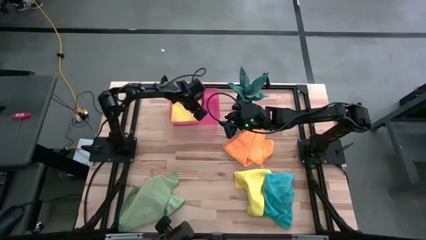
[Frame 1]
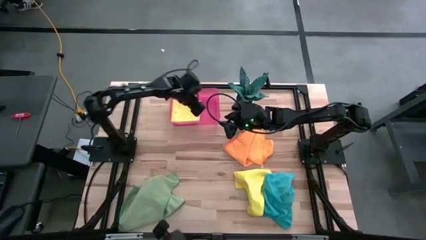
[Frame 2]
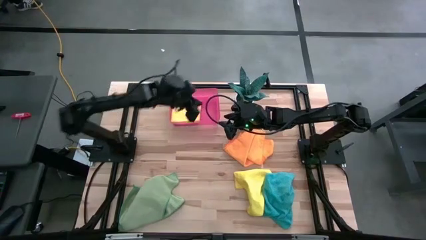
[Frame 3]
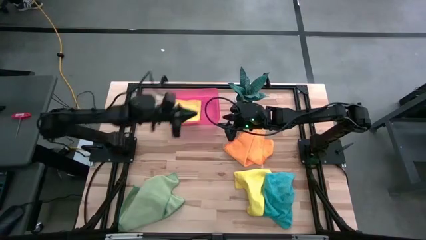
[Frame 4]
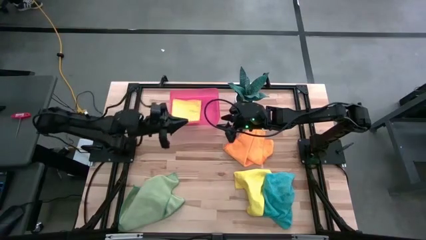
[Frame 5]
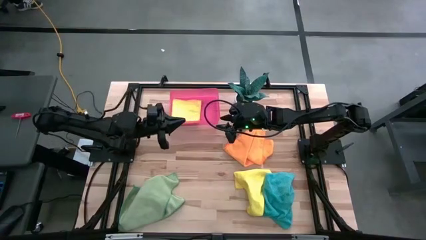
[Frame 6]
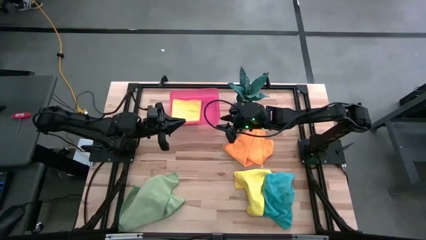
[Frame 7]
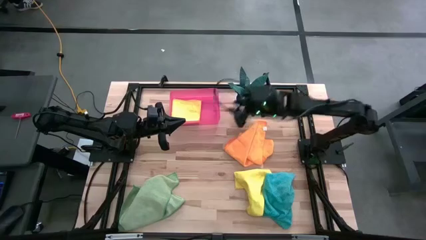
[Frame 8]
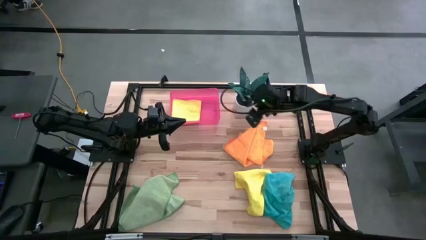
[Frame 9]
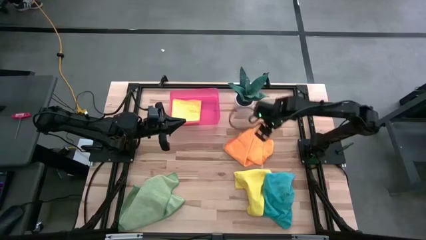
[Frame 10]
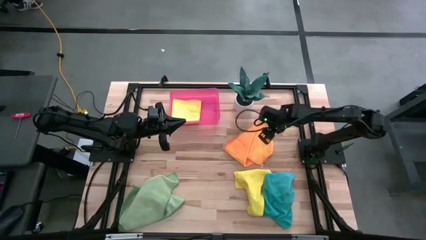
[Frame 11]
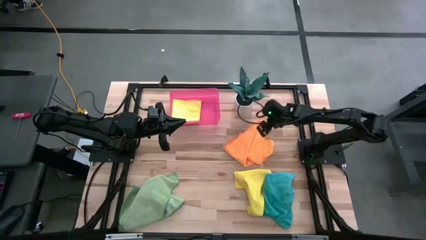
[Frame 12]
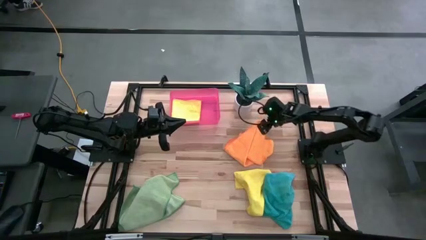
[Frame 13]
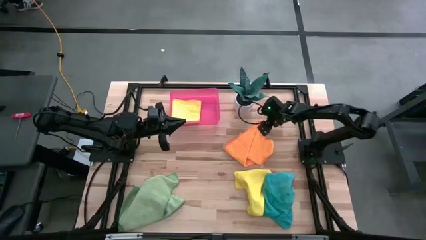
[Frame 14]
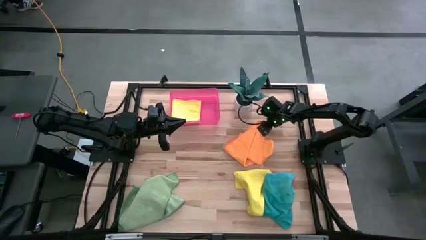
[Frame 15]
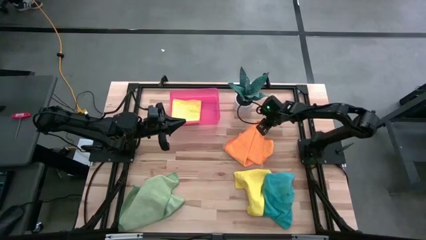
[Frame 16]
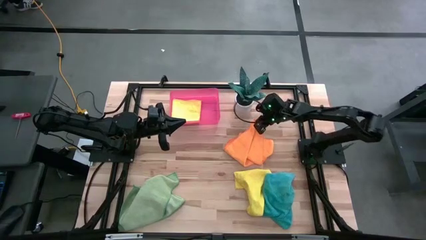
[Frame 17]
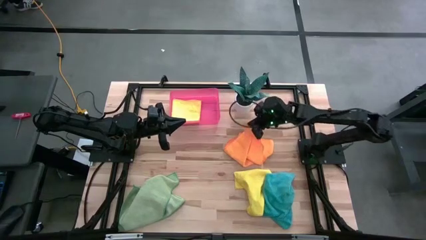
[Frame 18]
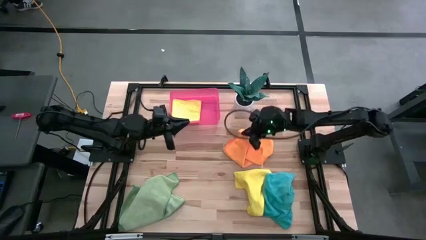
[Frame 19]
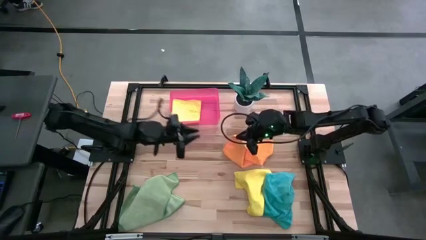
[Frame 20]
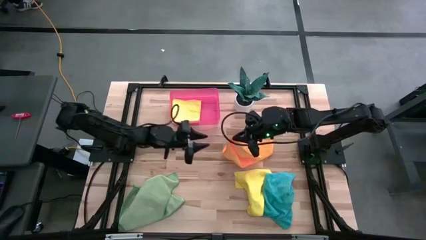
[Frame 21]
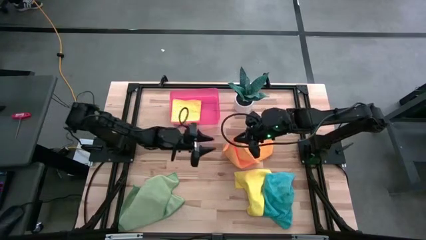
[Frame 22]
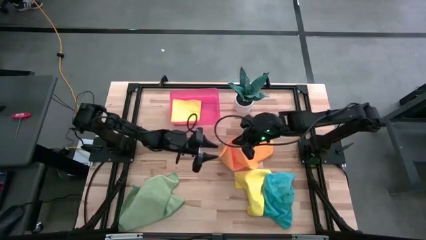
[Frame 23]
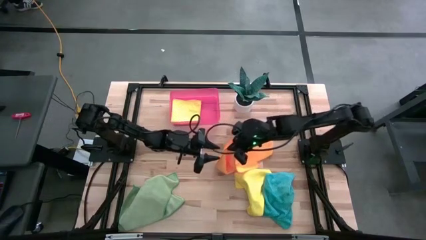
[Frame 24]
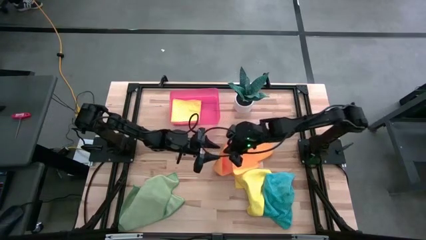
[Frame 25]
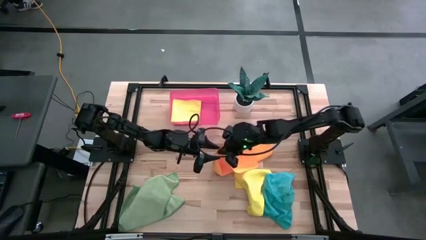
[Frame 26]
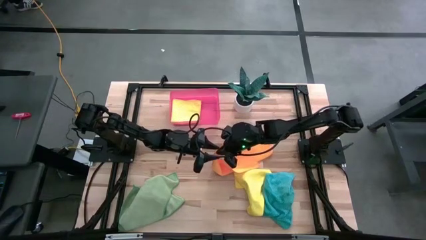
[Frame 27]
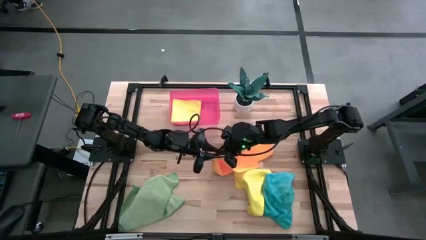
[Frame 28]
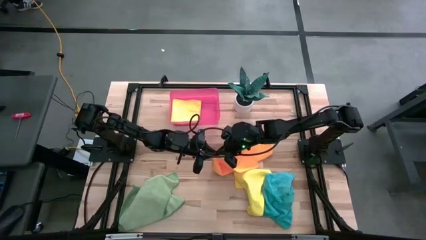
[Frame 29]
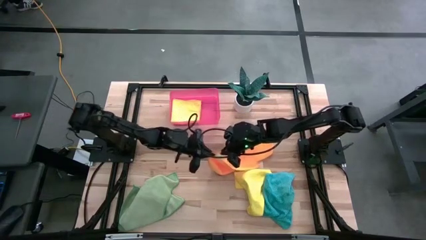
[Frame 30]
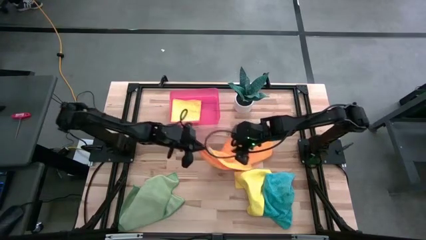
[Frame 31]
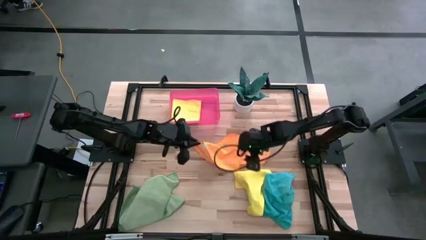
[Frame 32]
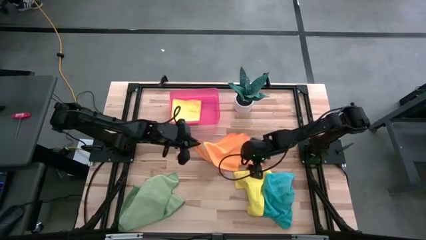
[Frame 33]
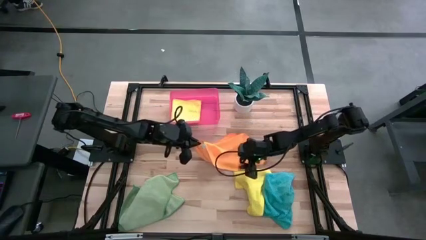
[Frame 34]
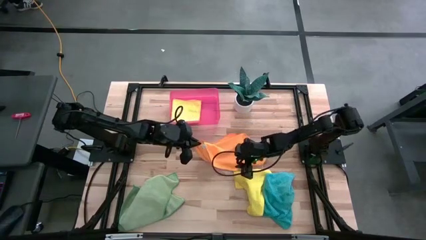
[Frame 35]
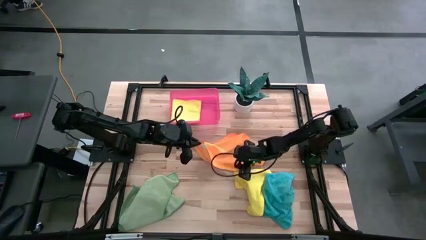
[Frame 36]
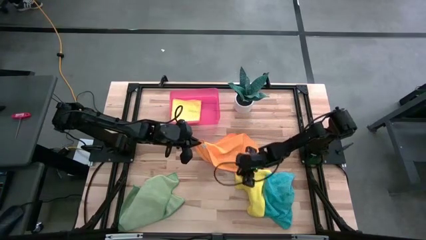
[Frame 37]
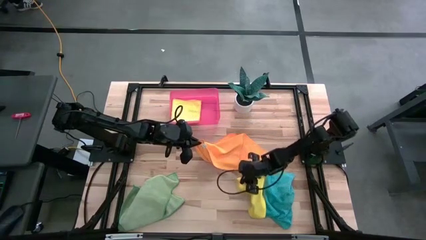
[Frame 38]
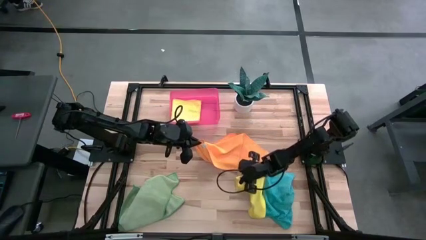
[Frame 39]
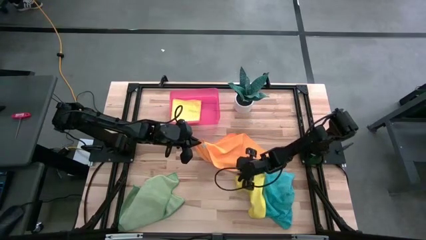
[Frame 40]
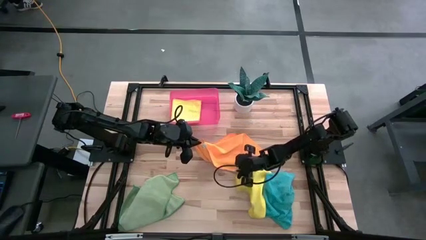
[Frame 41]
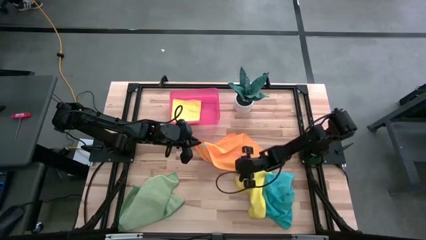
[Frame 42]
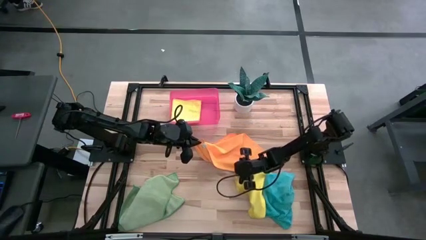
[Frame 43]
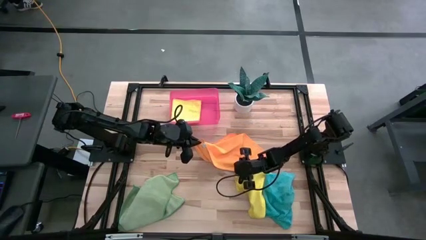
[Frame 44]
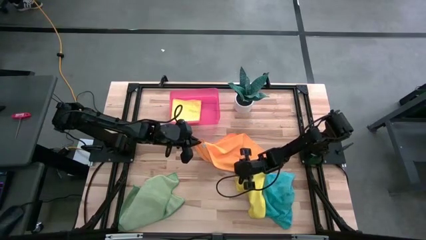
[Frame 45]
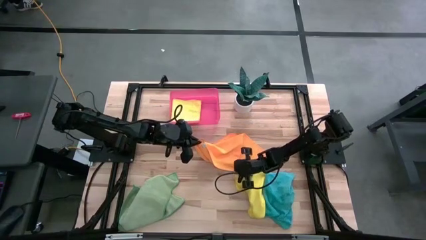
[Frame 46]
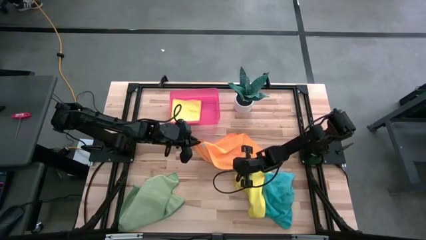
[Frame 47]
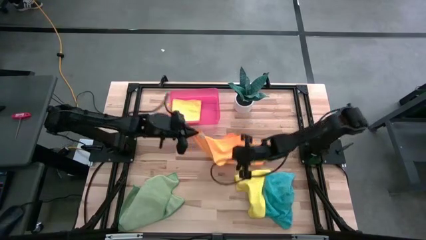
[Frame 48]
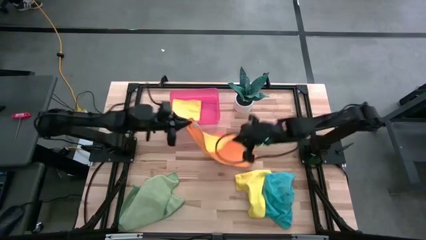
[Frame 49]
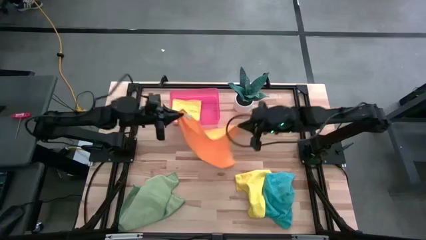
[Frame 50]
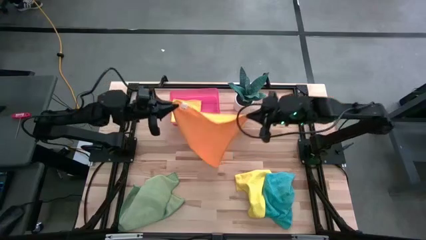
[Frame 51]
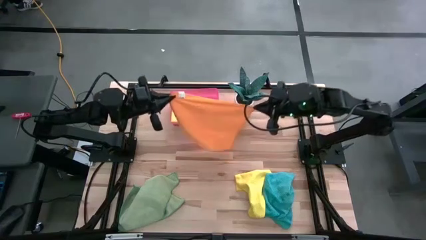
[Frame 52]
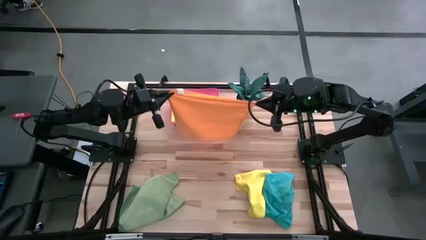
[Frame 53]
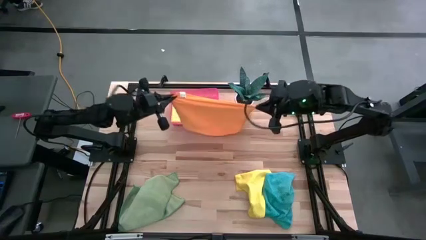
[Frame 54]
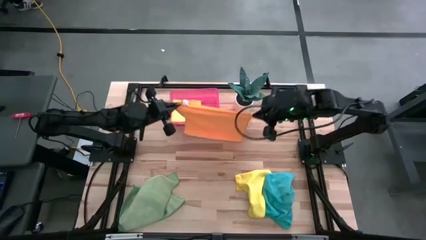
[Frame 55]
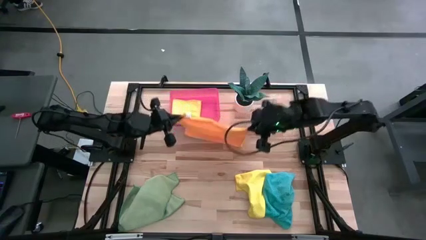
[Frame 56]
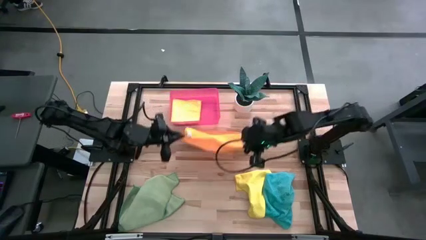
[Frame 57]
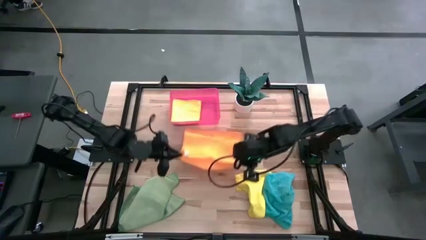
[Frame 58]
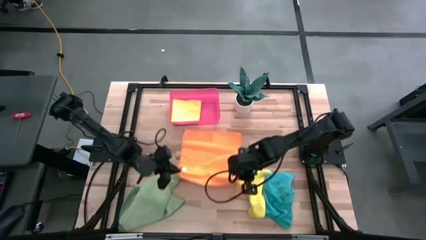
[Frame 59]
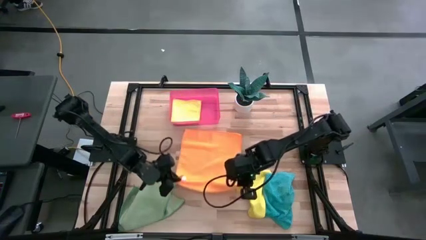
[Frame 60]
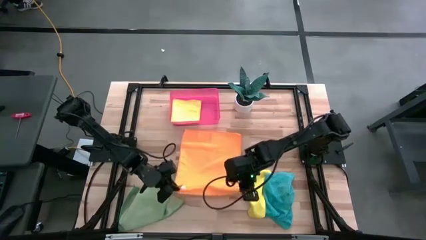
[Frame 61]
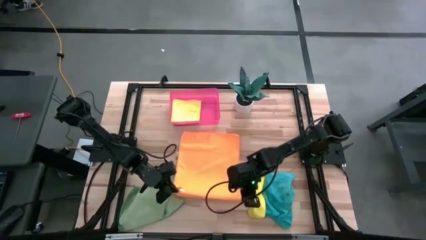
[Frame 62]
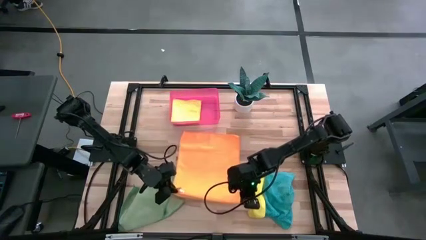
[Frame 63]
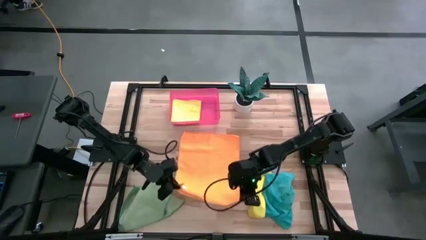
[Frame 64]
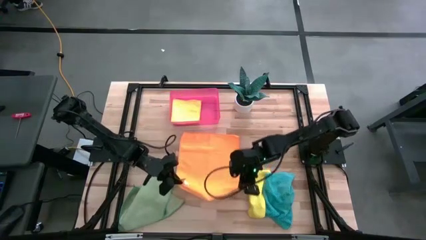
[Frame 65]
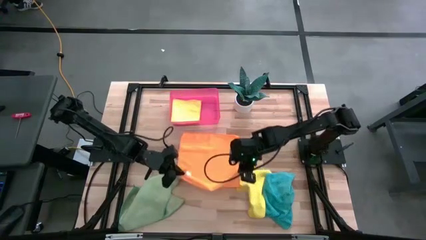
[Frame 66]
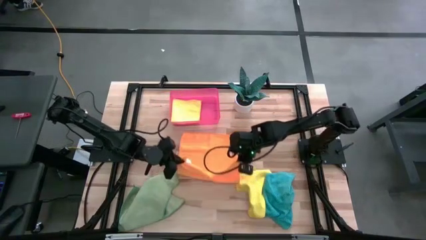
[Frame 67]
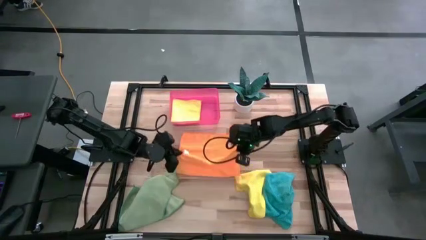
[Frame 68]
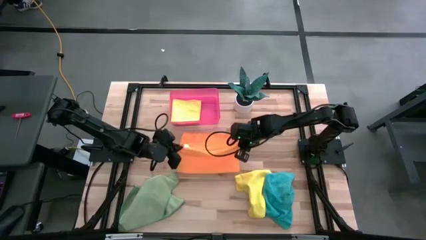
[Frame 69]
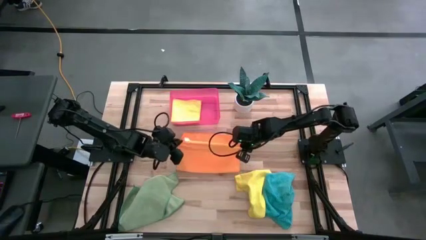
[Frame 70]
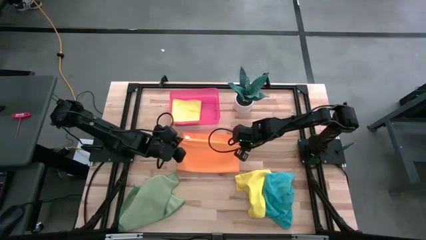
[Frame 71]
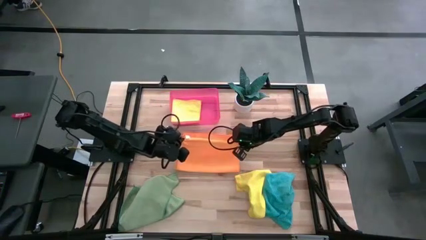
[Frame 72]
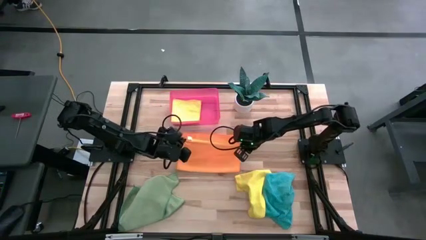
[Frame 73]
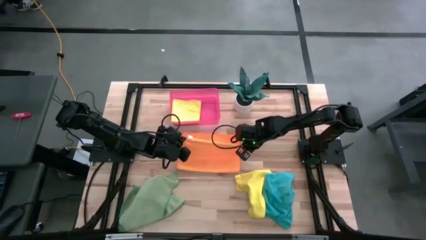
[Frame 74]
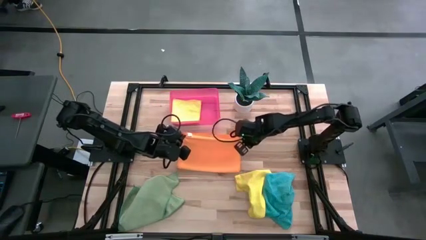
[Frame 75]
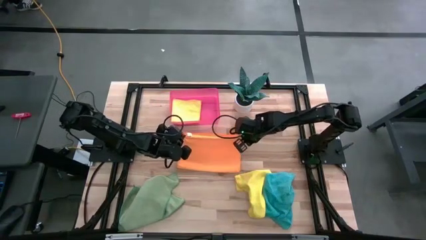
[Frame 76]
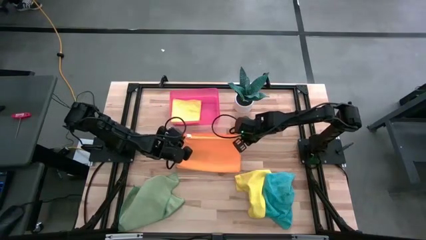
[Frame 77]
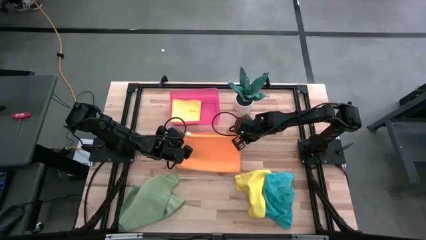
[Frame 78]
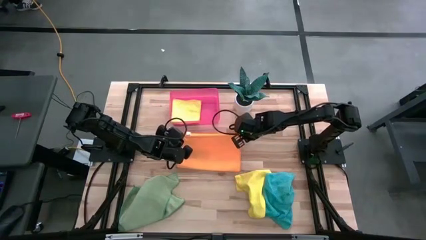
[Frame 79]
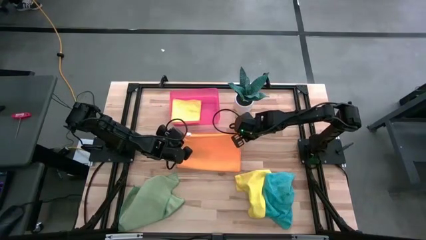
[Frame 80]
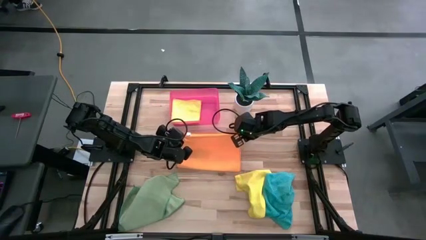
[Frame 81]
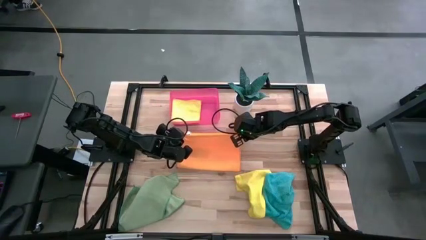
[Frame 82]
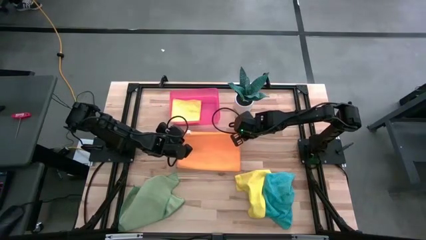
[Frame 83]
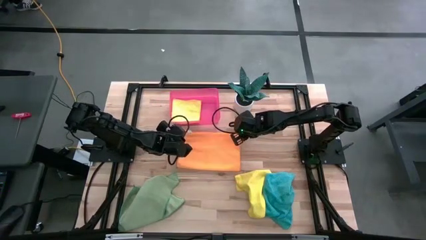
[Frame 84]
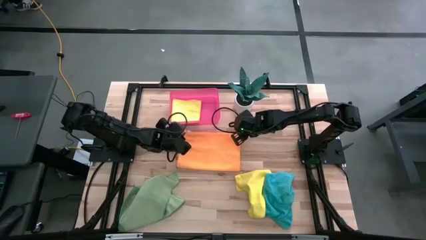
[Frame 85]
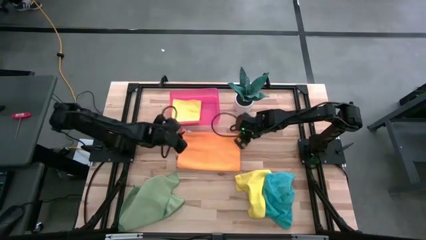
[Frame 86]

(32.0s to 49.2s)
Task: Fold microfiber towels
Fold the orange microfiber towel
